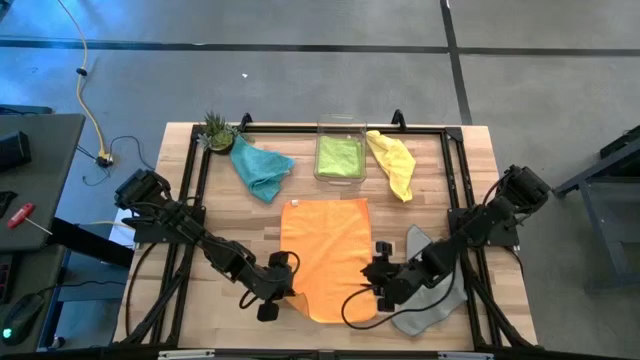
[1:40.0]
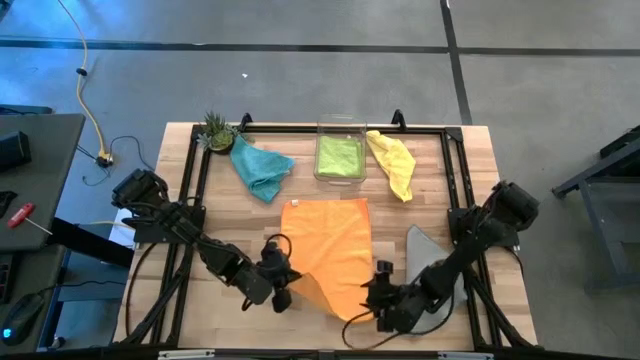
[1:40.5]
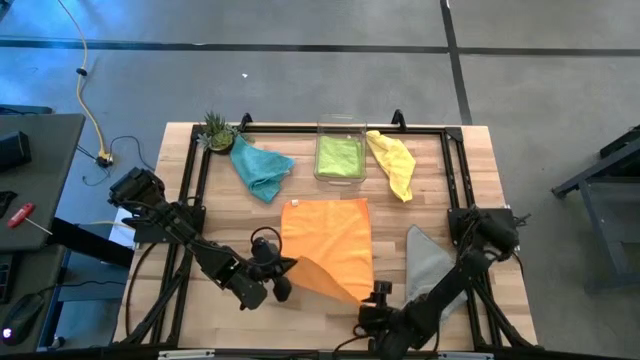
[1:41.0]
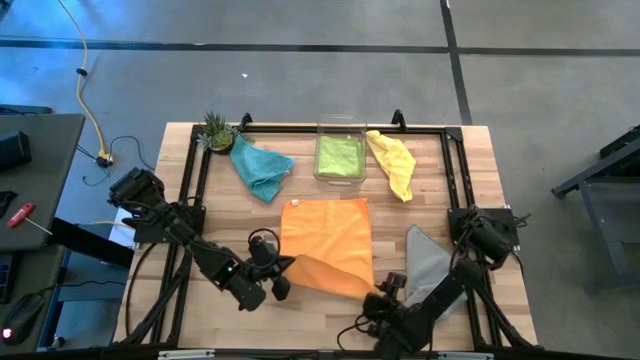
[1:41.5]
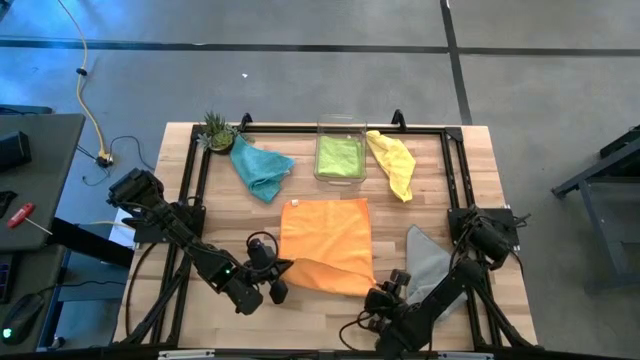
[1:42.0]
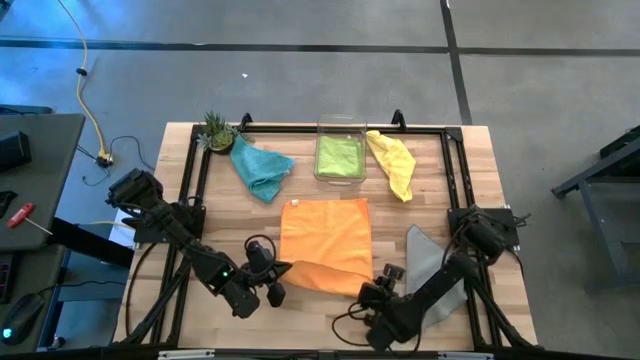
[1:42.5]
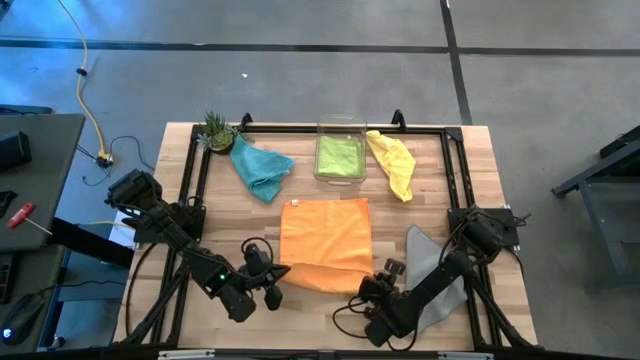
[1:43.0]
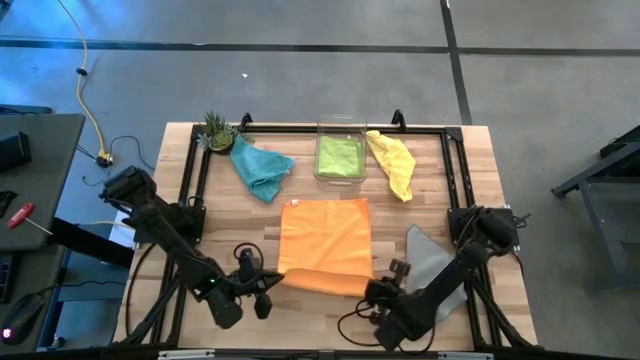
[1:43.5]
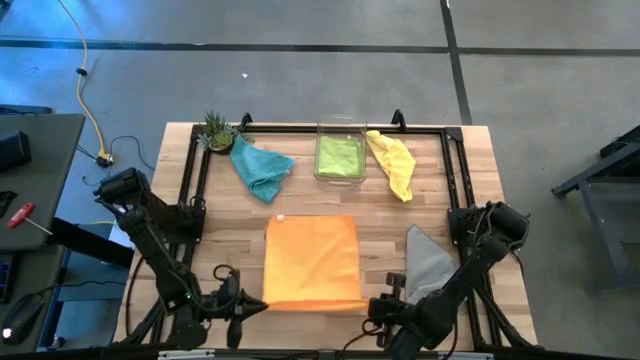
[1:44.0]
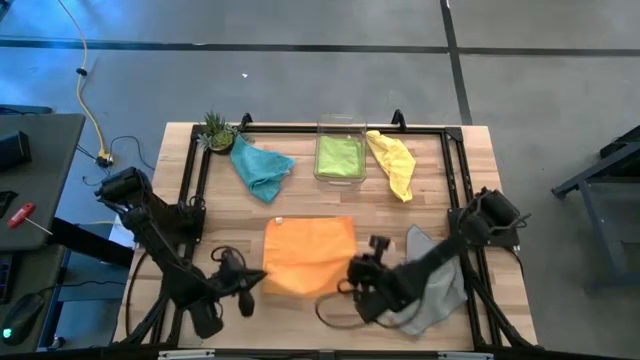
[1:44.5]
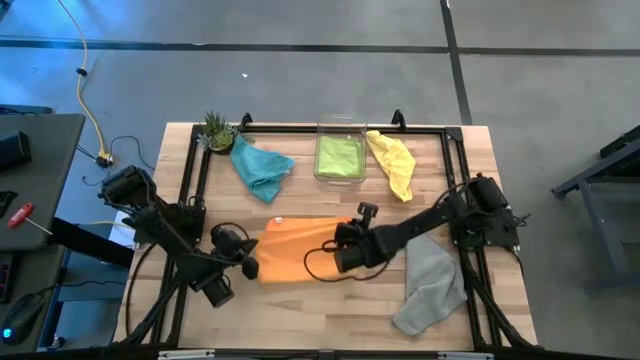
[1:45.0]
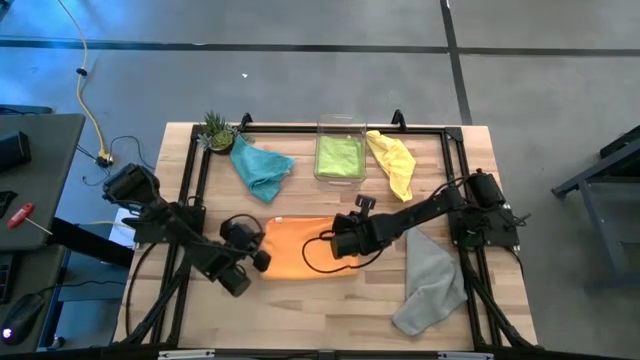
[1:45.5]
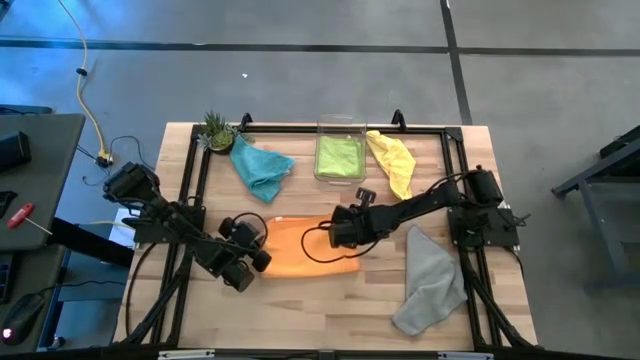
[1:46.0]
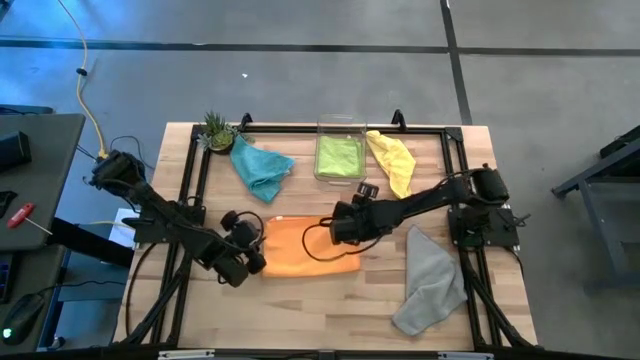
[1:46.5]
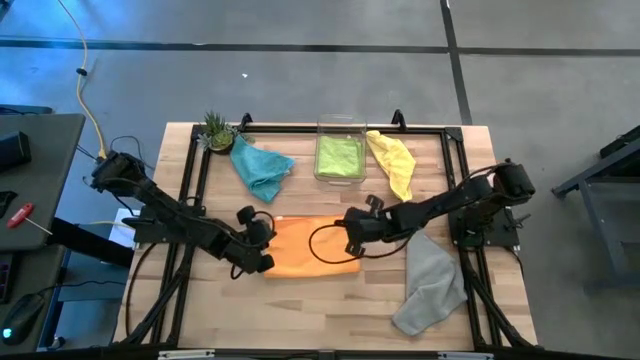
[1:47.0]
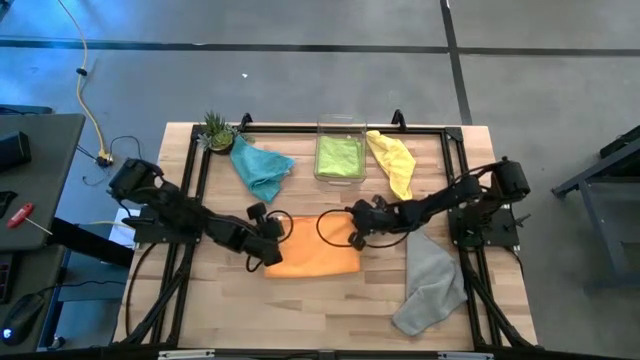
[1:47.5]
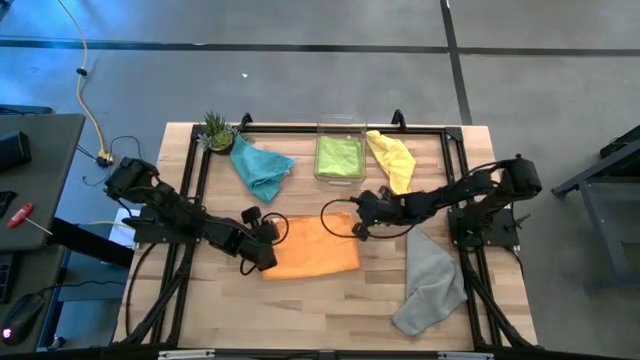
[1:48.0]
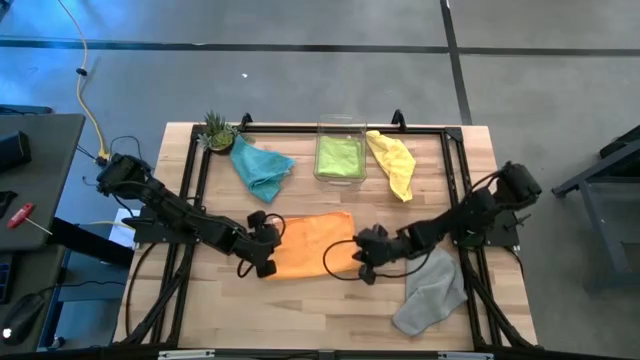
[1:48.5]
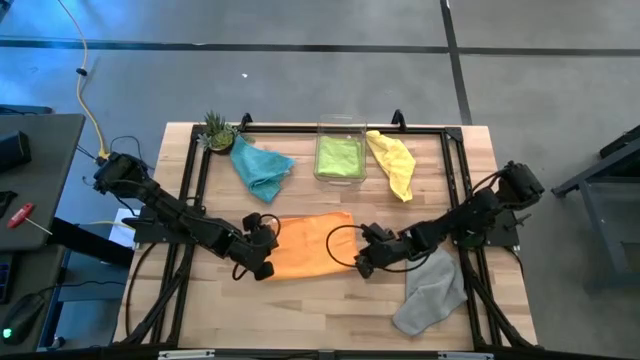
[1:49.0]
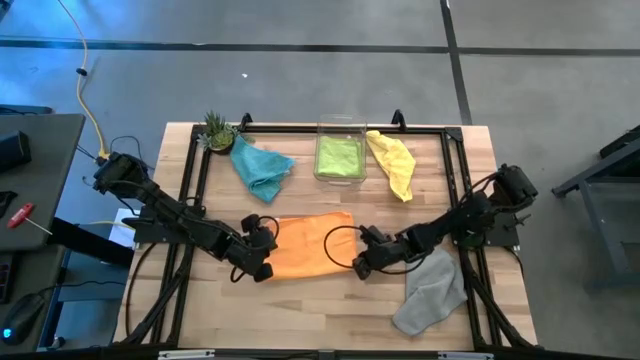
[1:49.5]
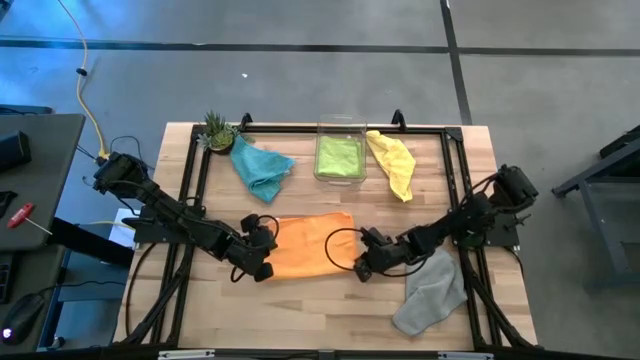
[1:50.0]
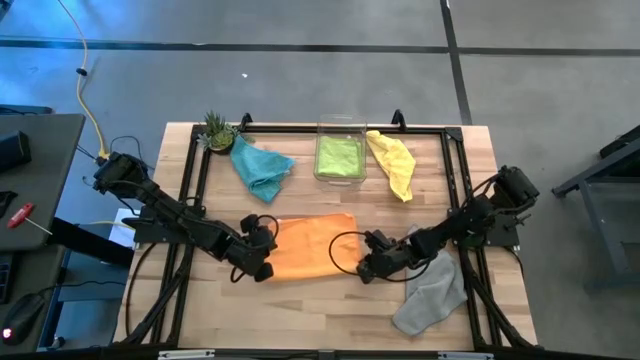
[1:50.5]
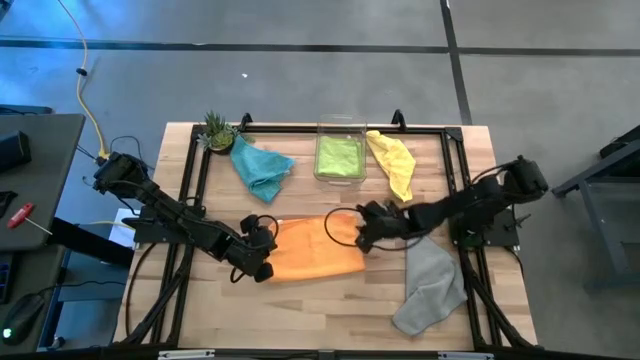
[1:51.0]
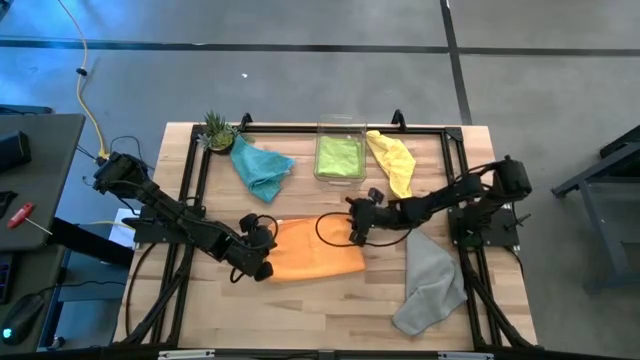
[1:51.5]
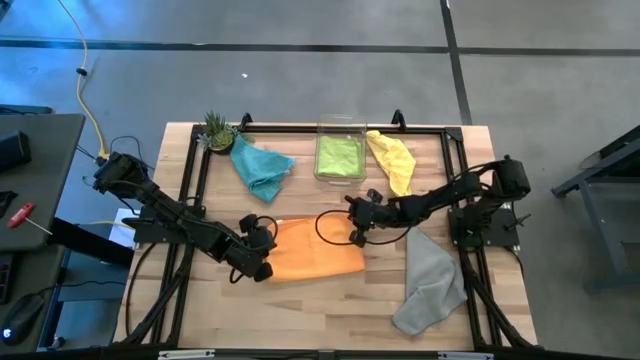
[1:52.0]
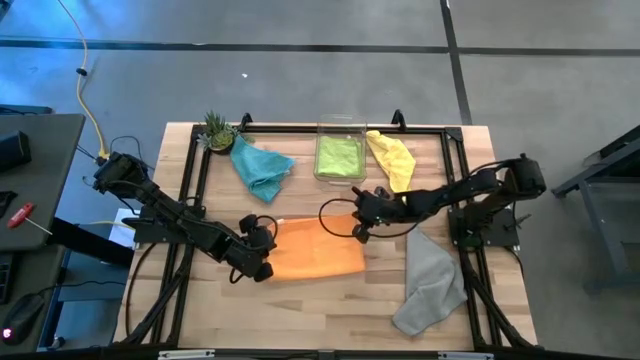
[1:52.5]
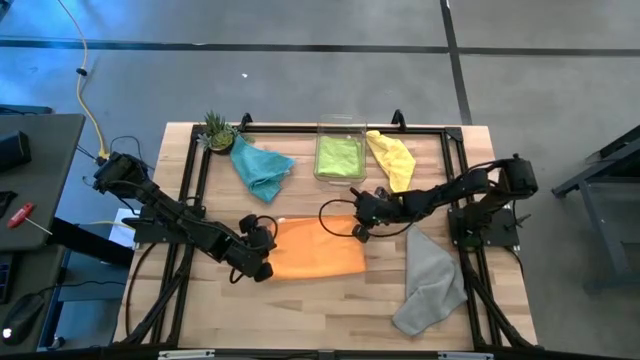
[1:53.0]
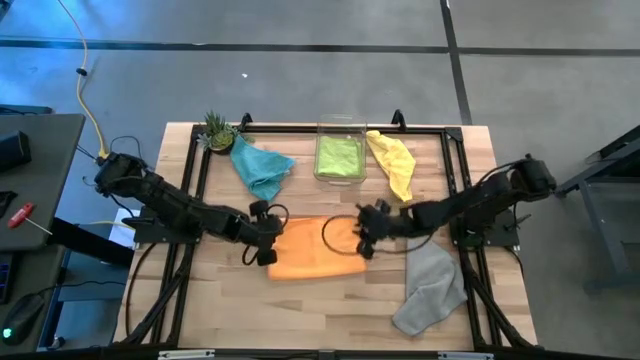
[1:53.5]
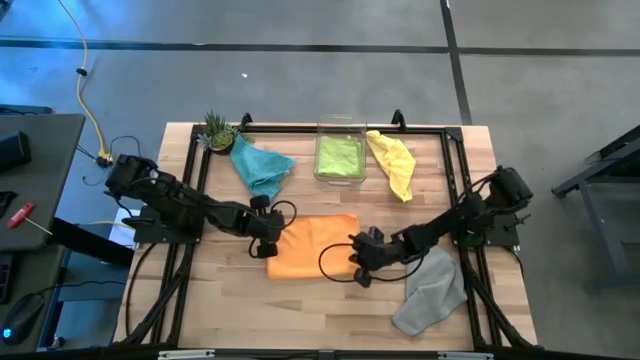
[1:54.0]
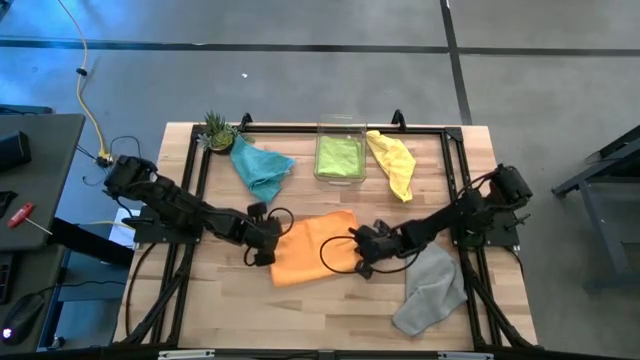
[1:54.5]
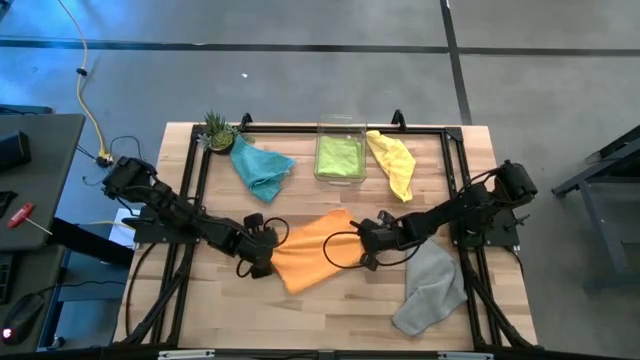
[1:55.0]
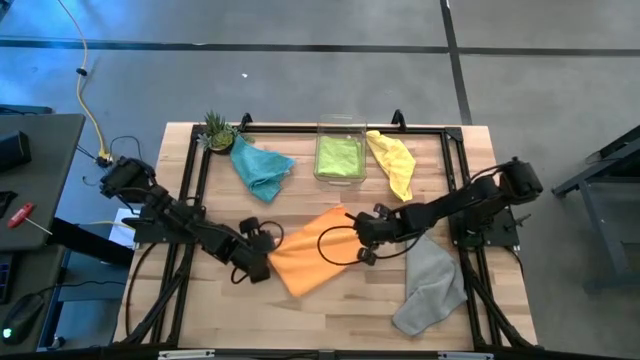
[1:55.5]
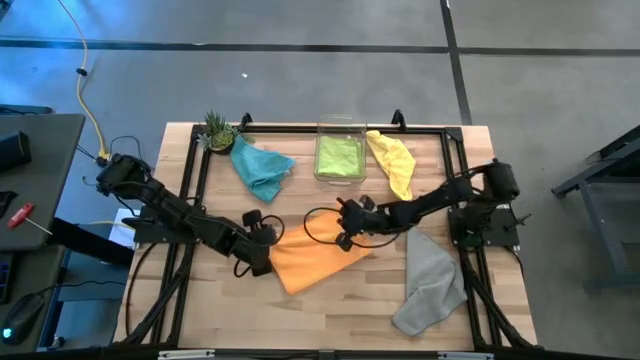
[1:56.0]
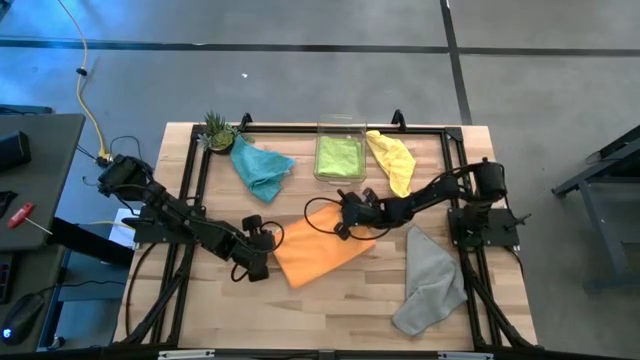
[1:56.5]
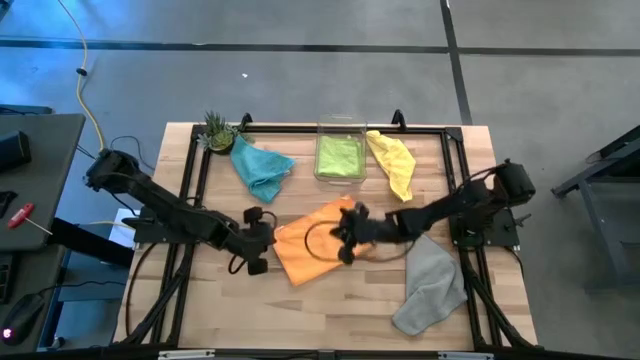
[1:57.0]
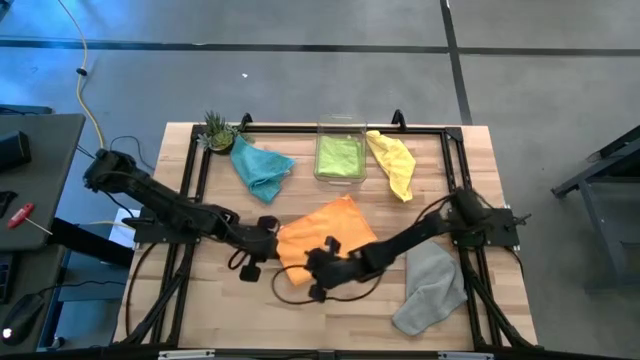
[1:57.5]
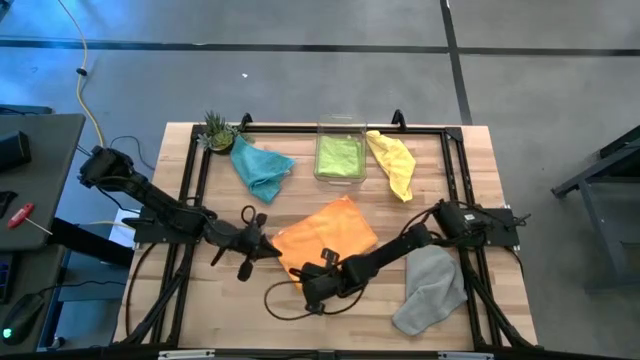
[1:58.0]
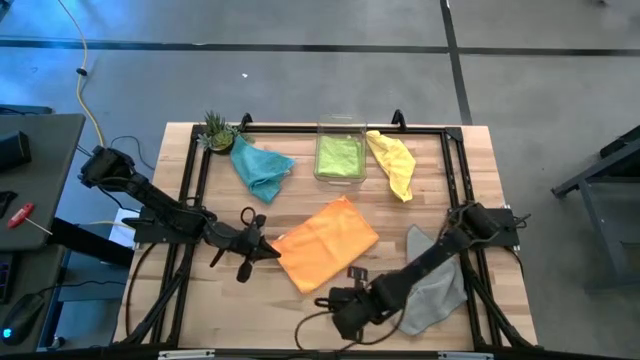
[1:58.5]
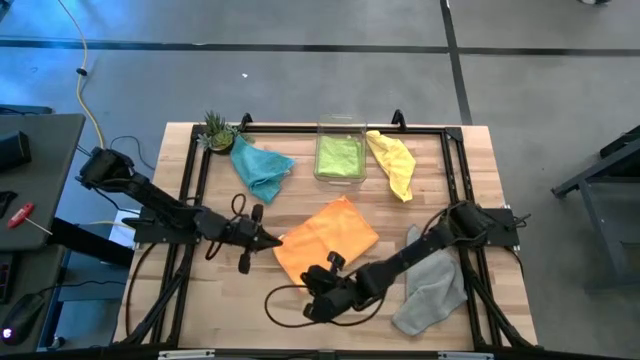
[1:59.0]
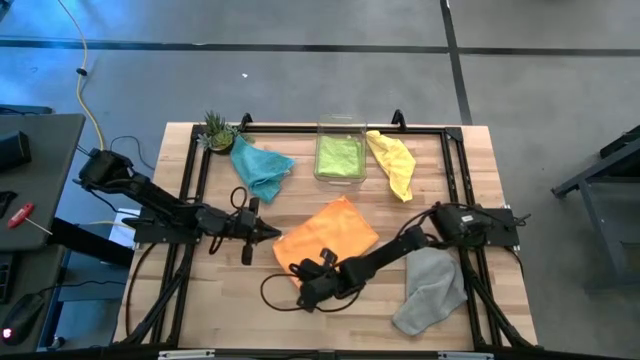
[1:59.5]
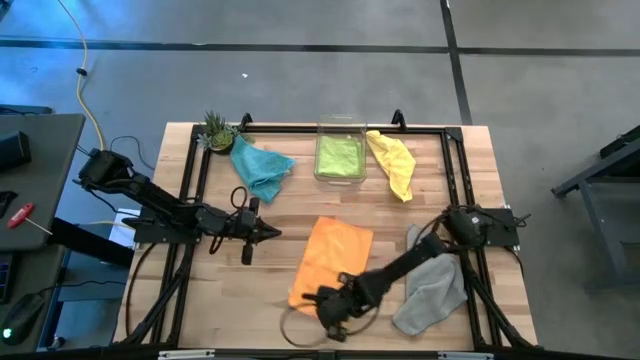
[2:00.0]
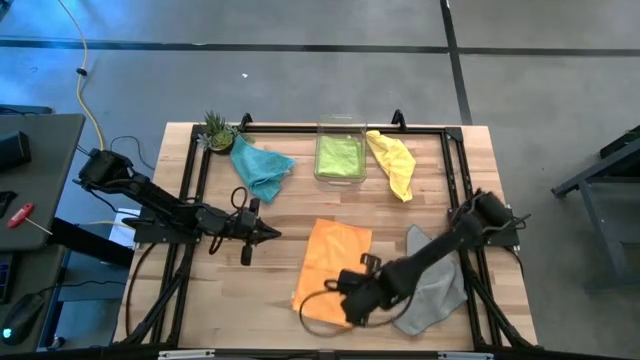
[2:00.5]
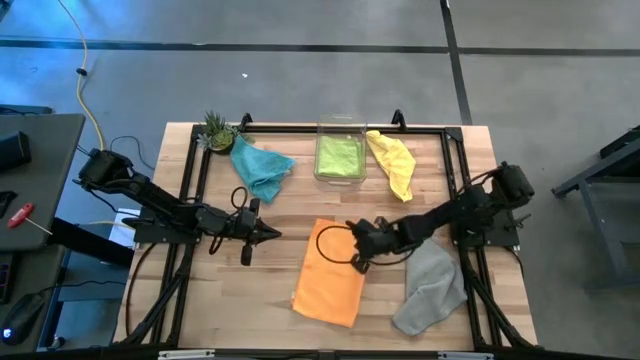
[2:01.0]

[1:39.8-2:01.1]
Task: Fold microfiber towels
Fold the orange microfiber cloth
